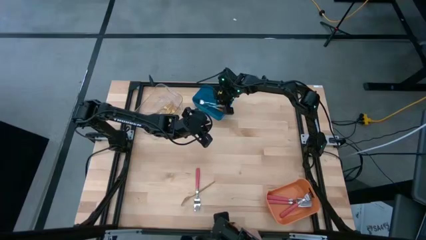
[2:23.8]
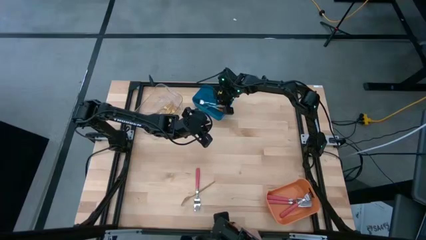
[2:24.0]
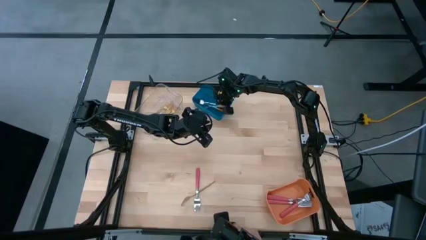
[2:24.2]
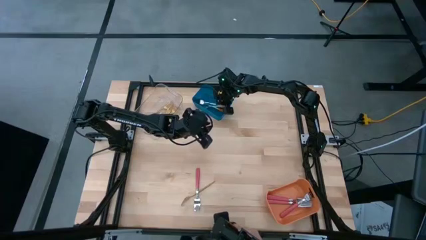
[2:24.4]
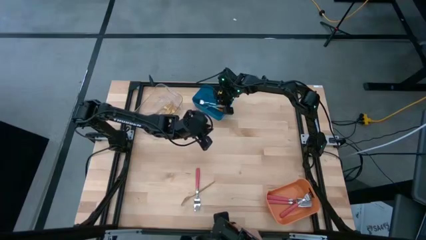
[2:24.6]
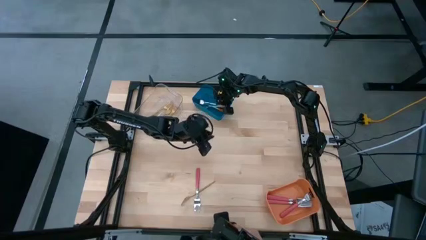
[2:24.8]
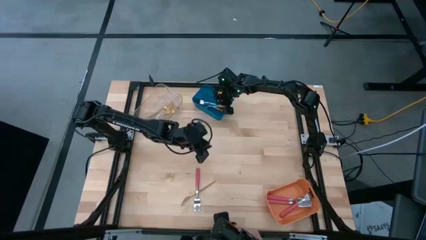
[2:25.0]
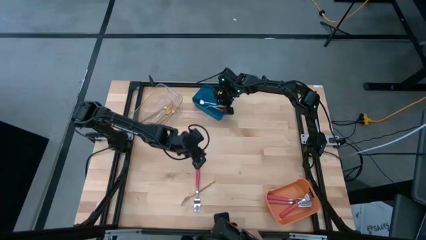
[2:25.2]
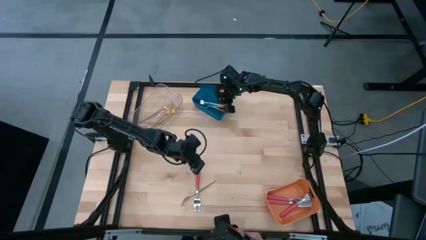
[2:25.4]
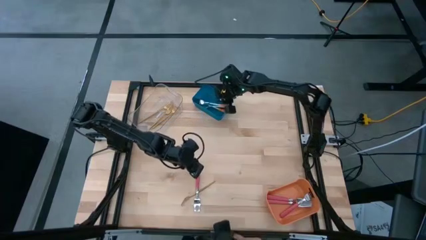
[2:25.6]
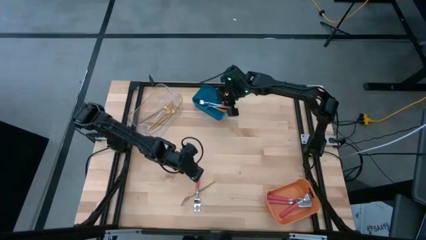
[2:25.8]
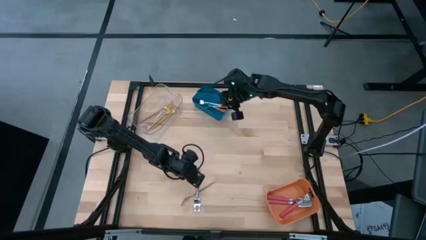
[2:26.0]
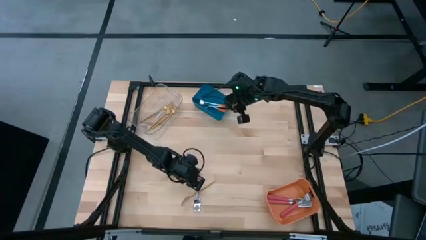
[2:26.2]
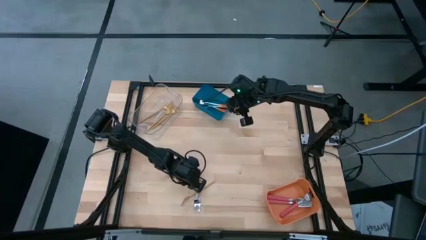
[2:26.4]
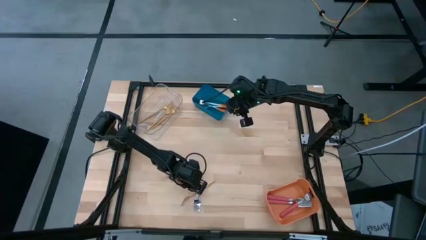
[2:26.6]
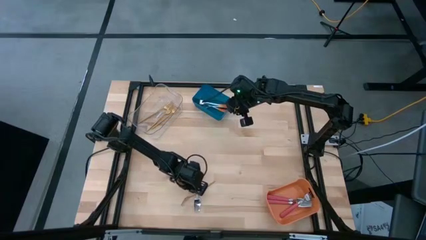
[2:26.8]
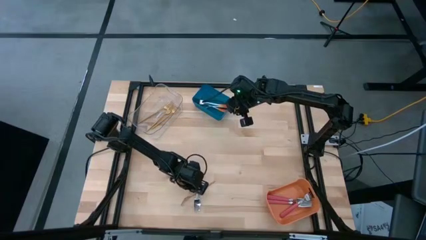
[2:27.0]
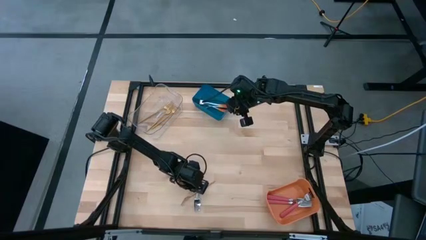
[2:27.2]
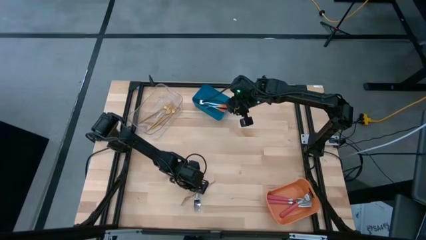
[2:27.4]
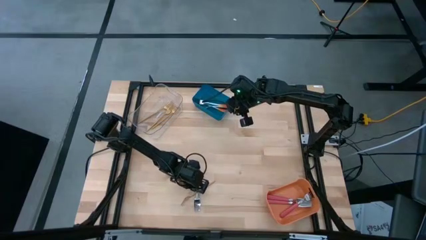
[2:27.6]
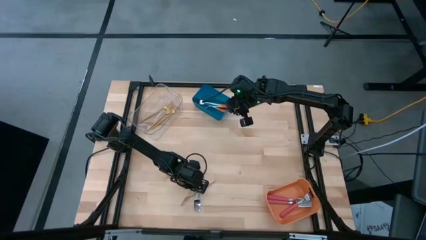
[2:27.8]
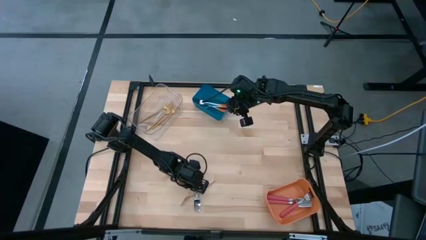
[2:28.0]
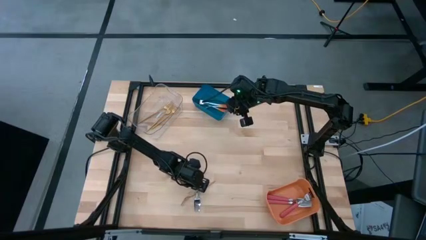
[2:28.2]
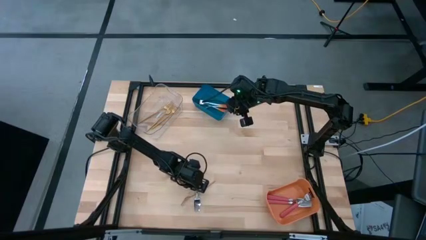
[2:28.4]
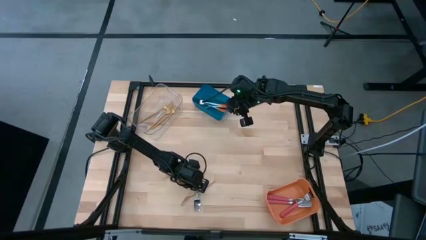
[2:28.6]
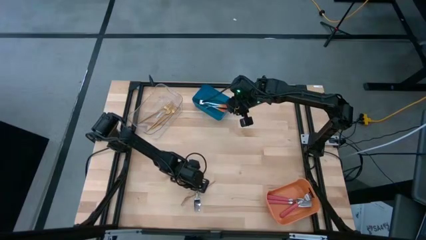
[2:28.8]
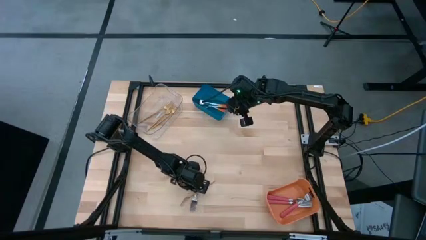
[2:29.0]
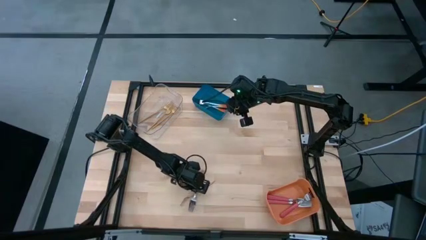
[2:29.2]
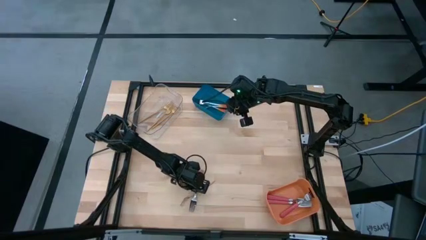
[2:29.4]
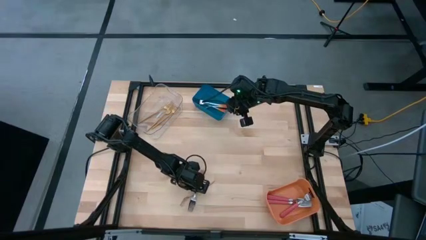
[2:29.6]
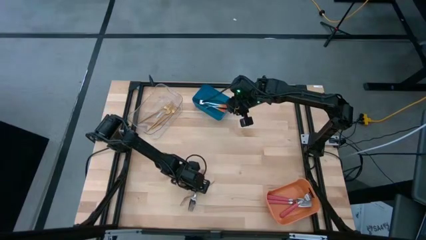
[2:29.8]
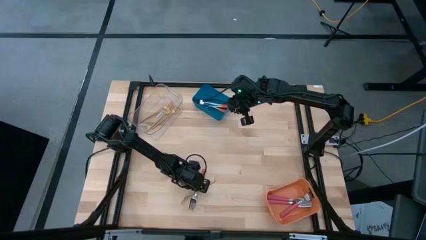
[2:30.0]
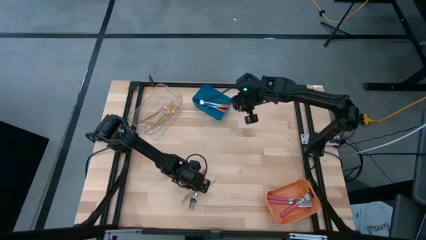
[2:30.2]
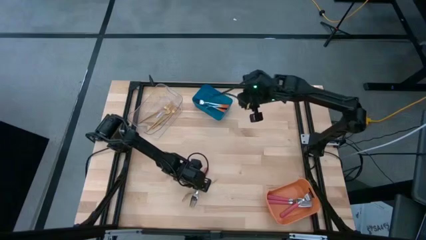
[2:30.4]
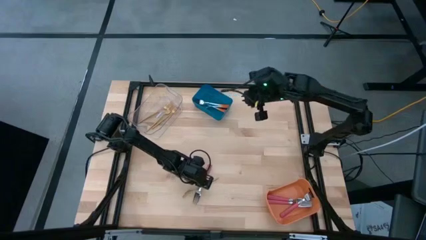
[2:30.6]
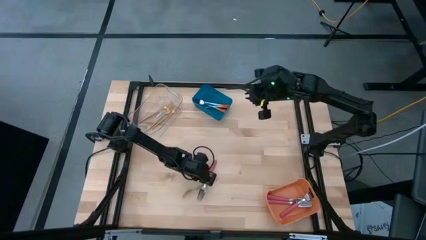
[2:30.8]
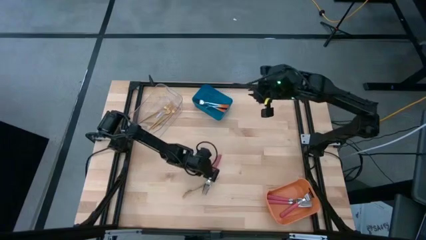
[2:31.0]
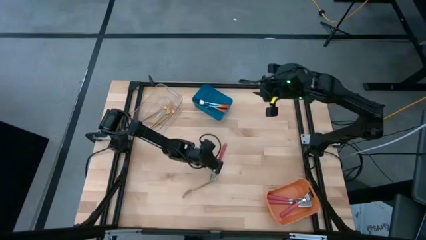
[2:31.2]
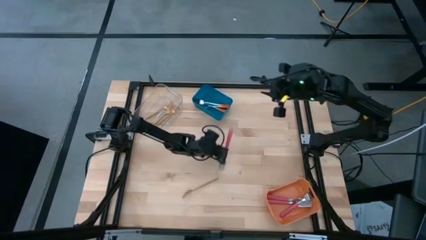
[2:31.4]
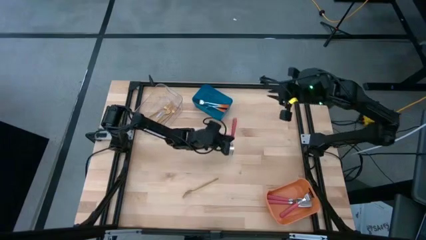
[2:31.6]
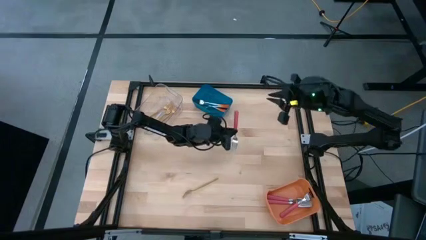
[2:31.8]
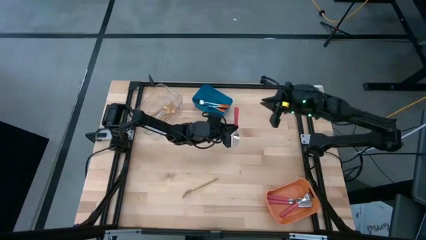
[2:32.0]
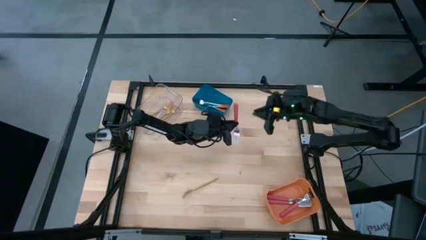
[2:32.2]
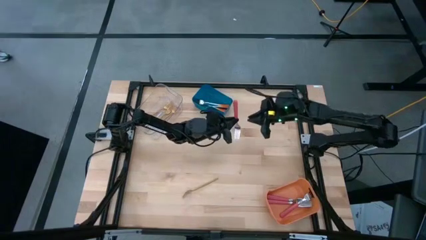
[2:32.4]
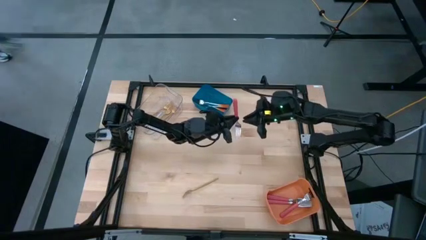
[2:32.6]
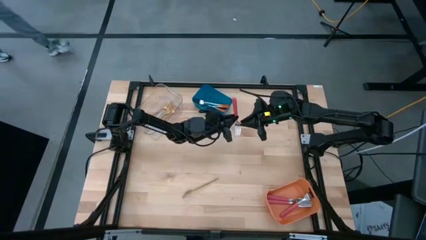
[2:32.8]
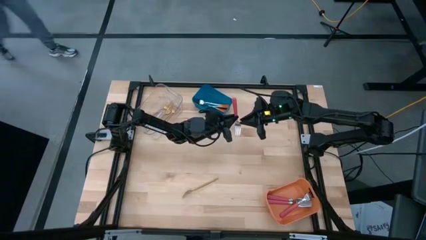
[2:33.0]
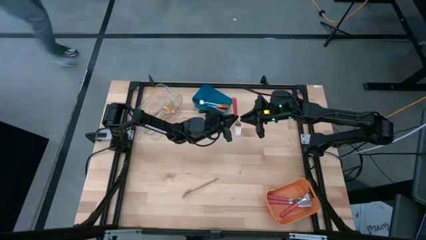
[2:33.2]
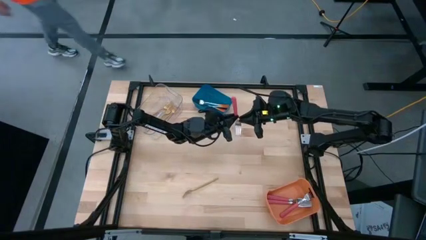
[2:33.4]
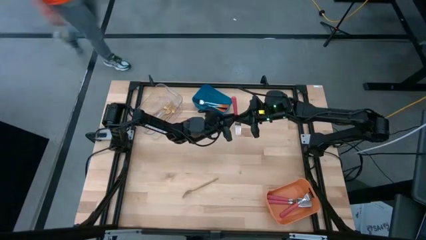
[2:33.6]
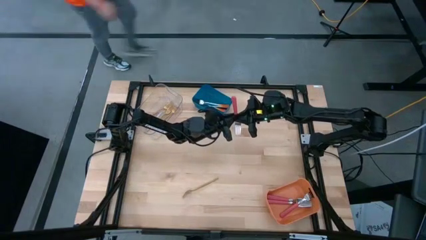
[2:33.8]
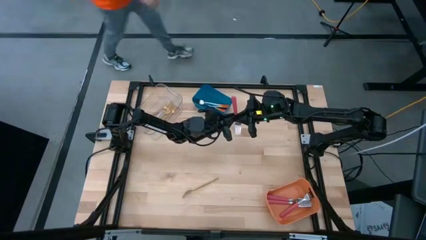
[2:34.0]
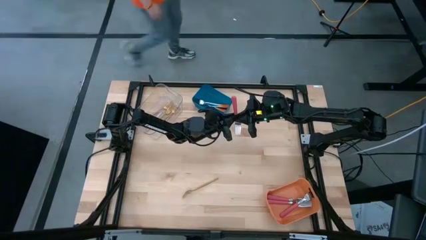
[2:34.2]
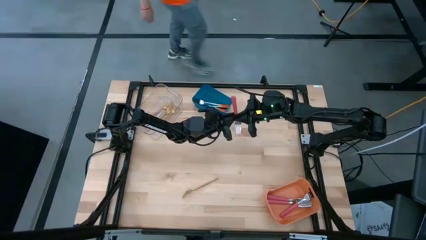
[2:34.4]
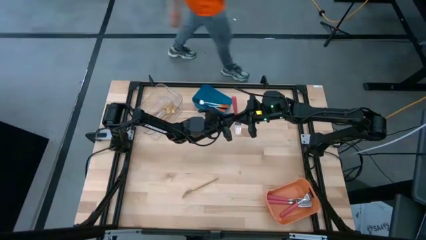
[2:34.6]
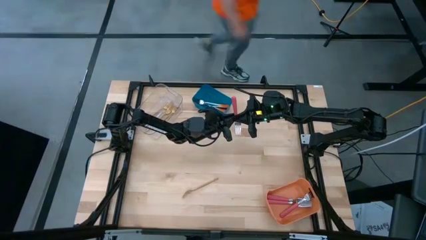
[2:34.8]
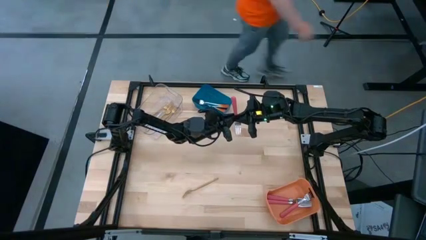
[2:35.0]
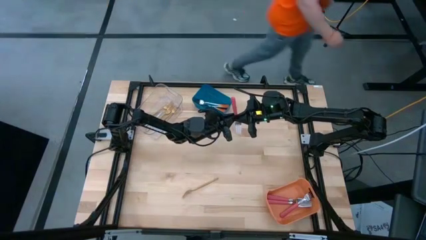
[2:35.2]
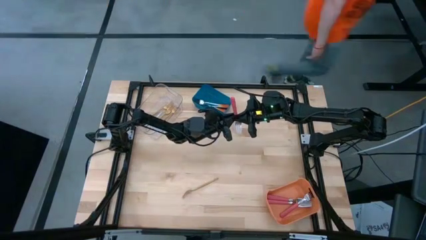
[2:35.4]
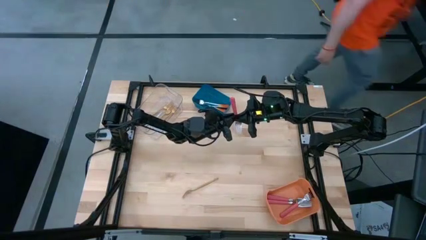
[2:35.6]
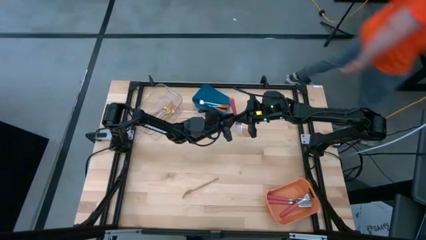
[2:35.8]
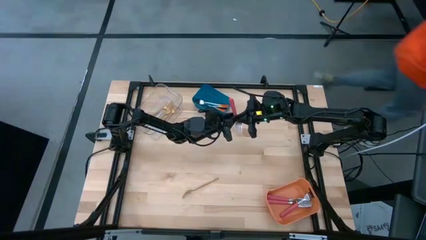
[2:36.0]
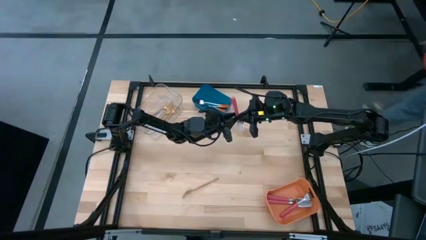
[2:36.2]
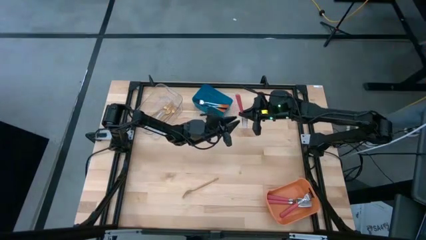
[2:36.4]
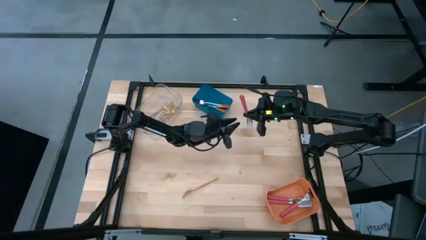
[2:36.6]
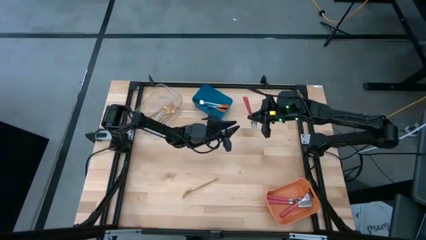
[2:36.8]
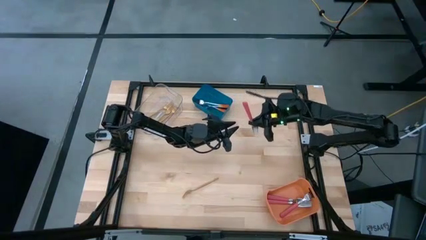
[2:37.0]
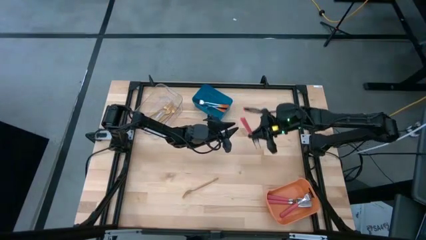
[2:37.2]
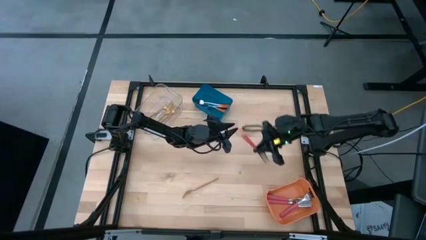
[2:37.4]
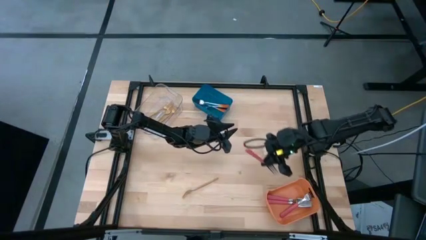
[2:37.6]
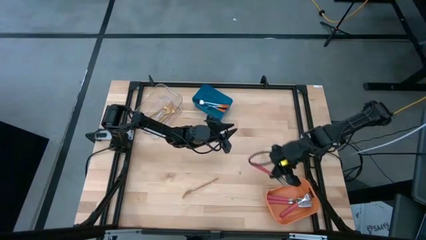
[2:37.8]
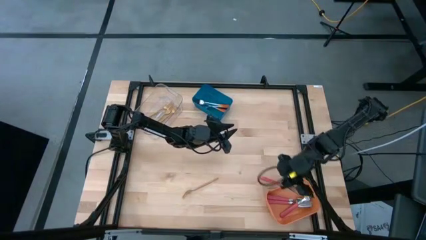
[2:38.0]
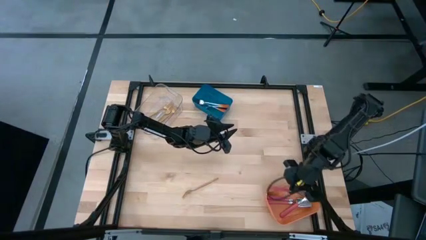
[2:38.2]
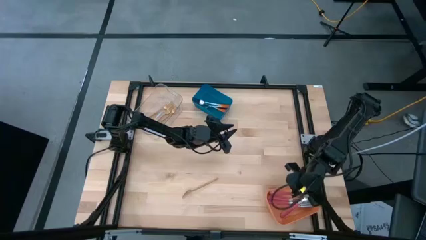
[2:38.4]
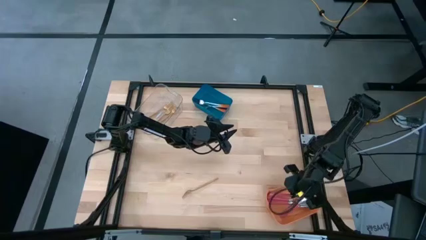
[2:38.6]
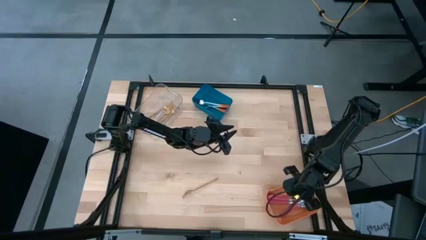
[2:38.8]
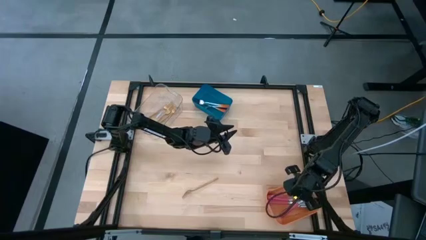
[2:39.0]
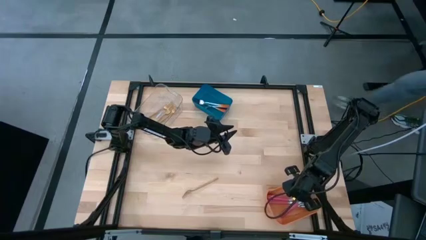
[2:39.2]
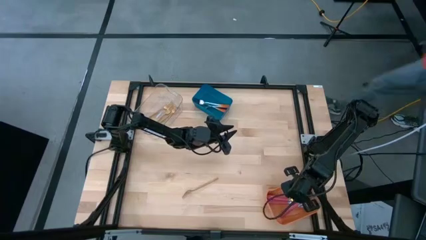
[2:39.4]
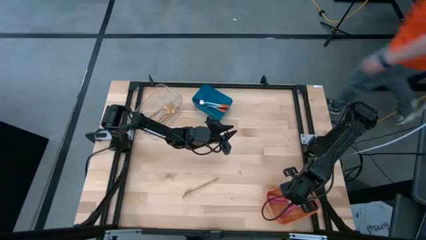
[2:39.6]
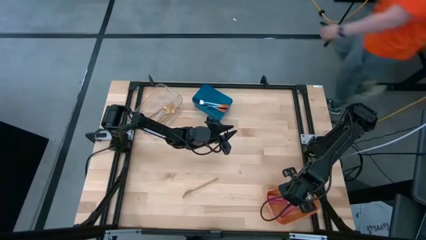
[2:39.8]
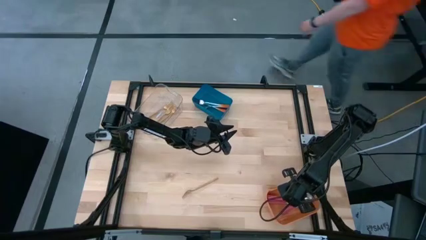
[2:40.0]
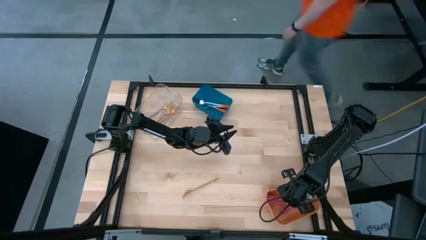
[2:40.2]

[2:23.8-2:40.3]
Task: Sort silverware by color (type)
Put the pink fork into the orange bin
